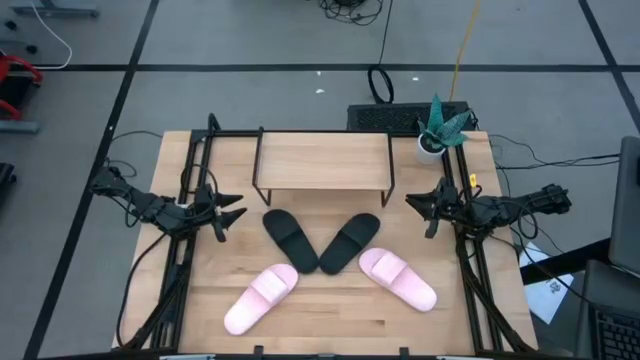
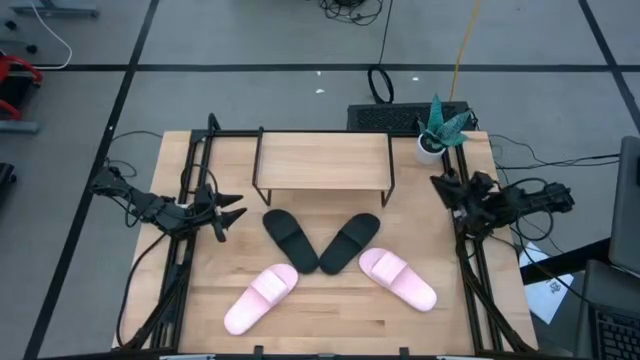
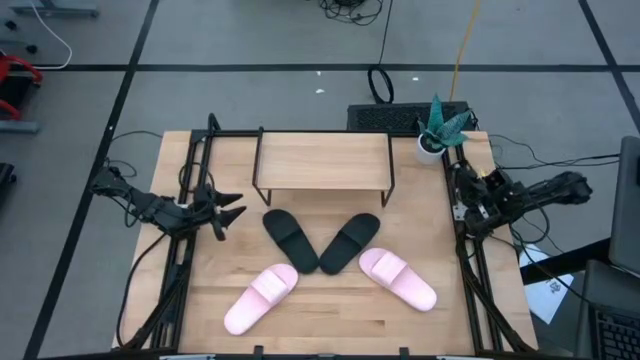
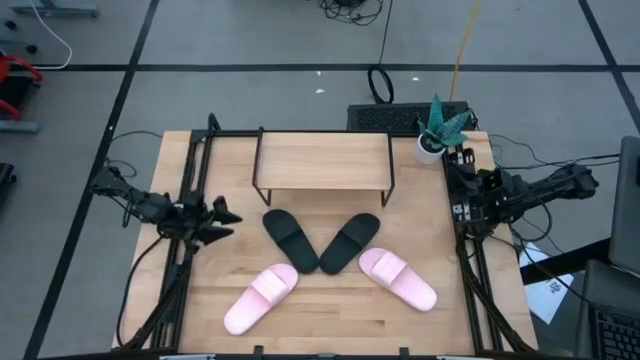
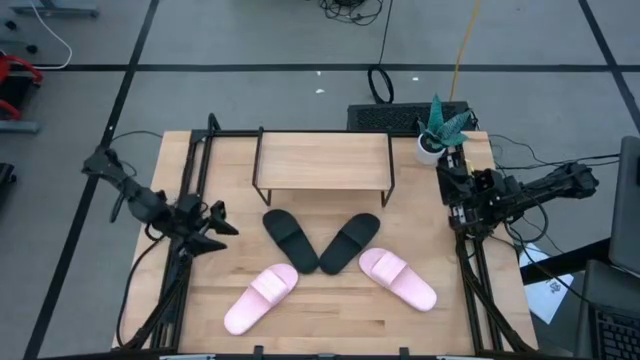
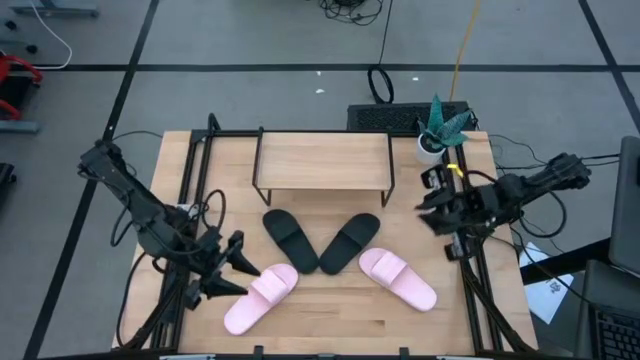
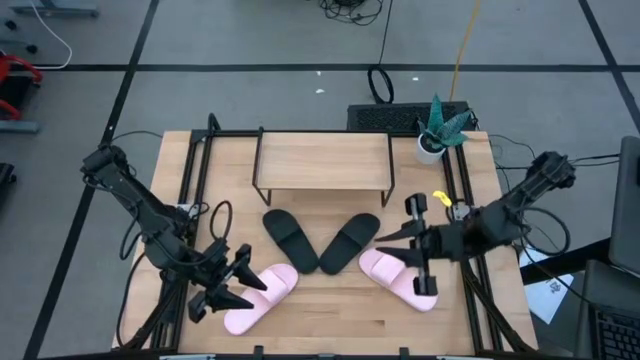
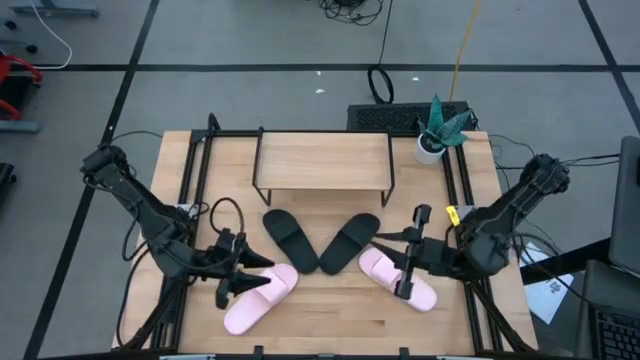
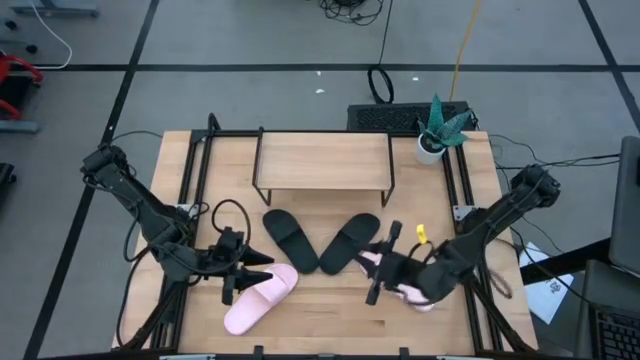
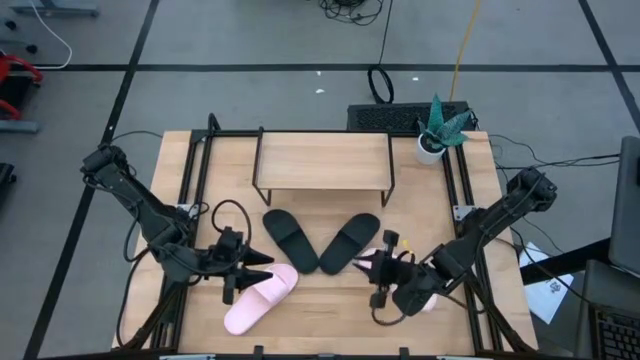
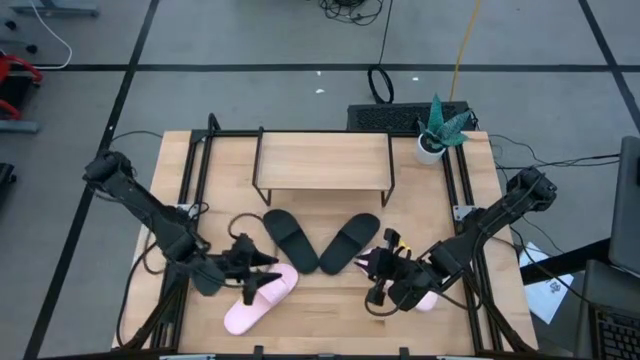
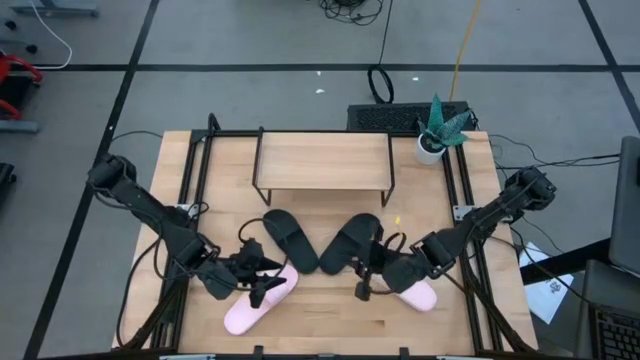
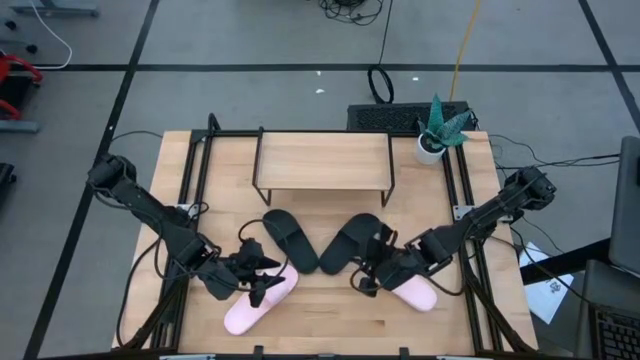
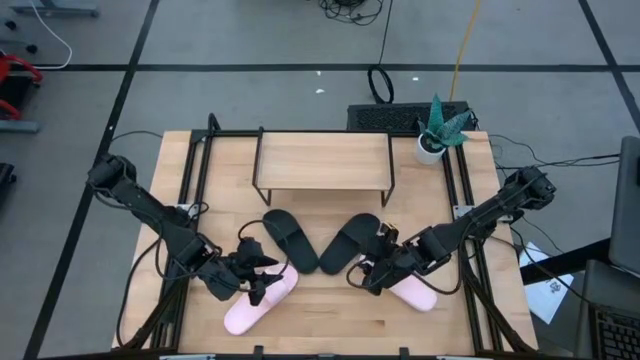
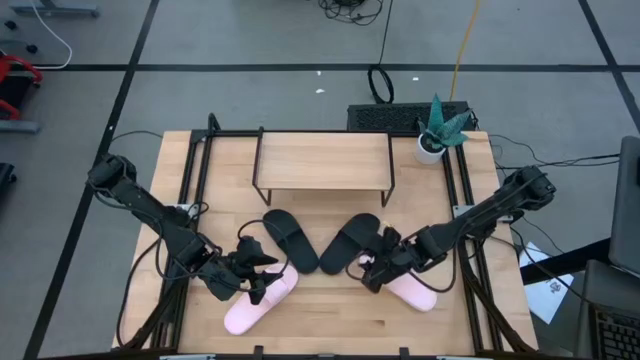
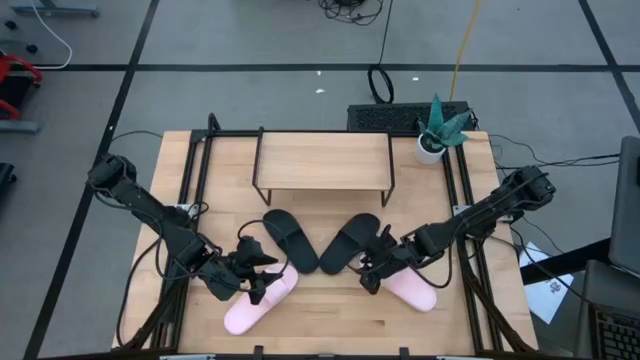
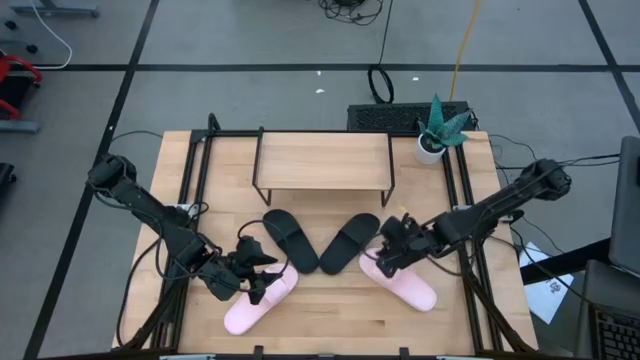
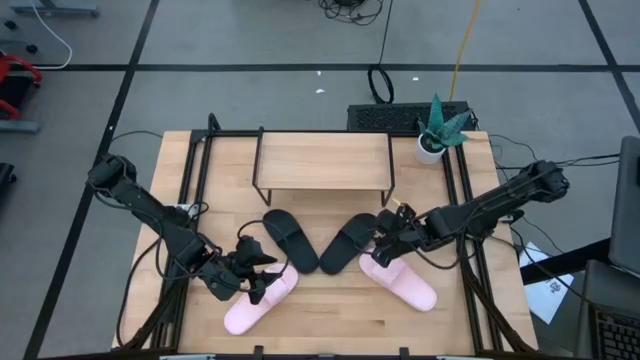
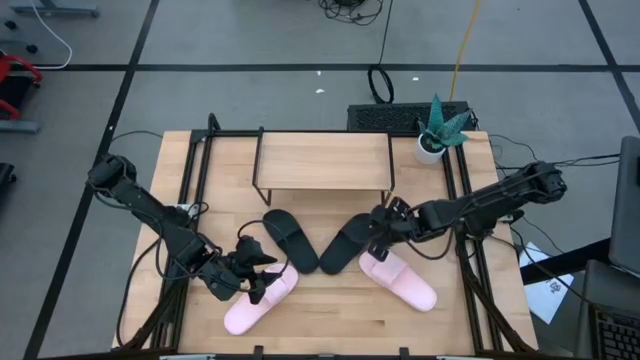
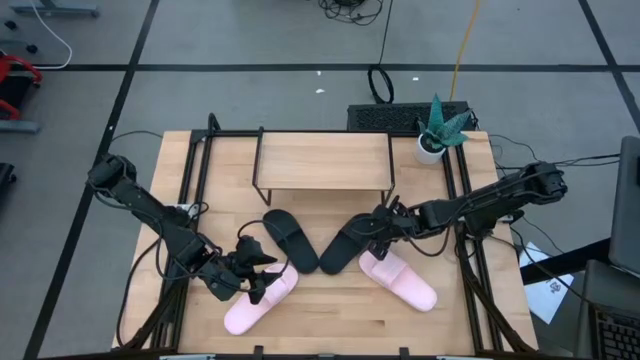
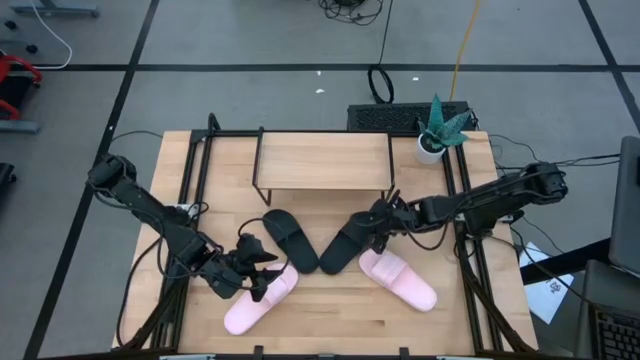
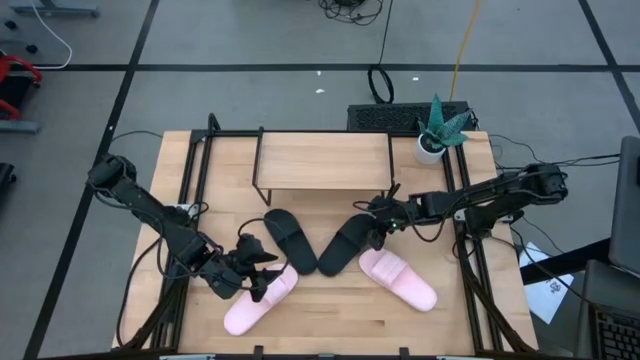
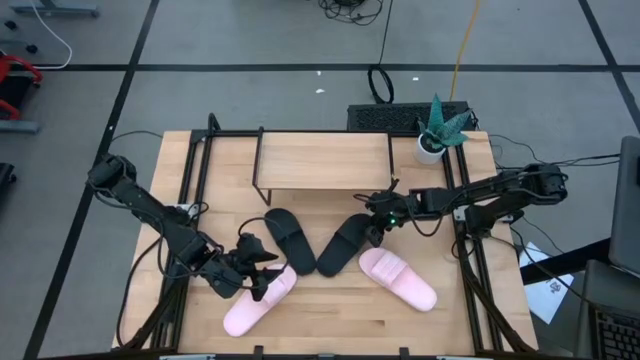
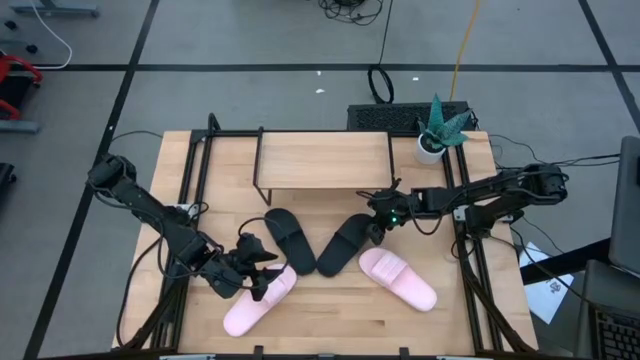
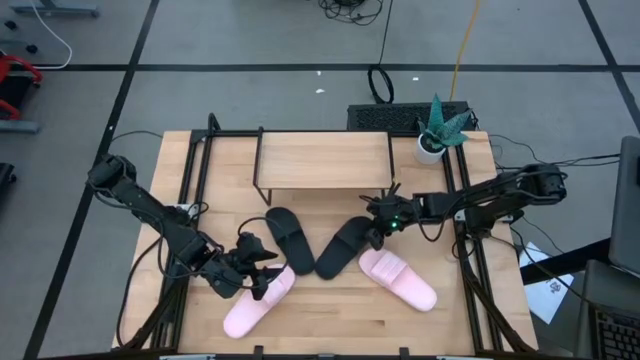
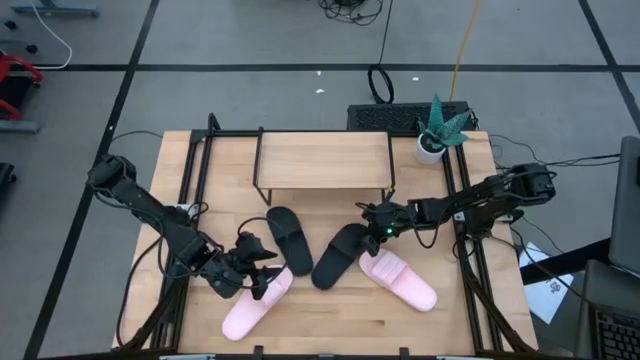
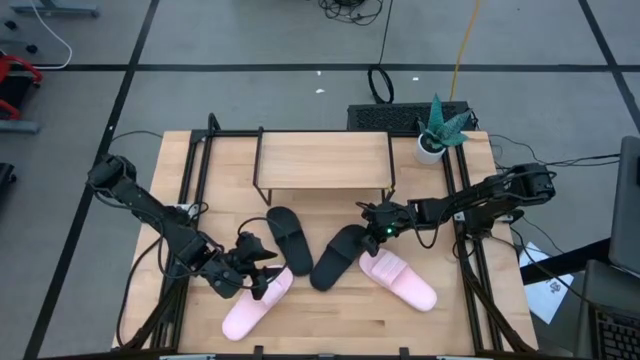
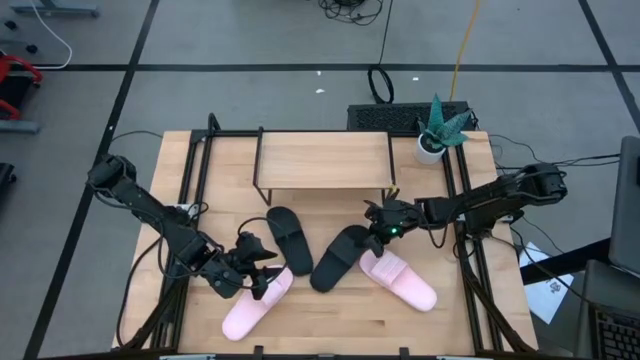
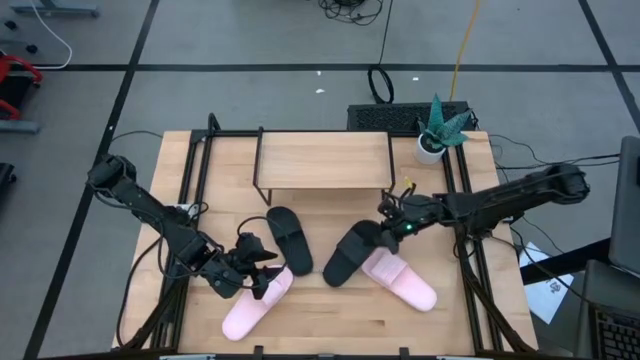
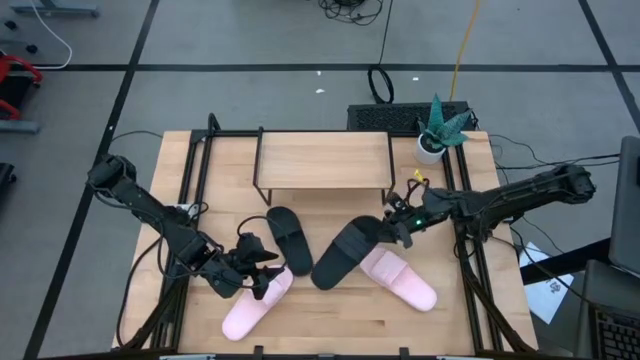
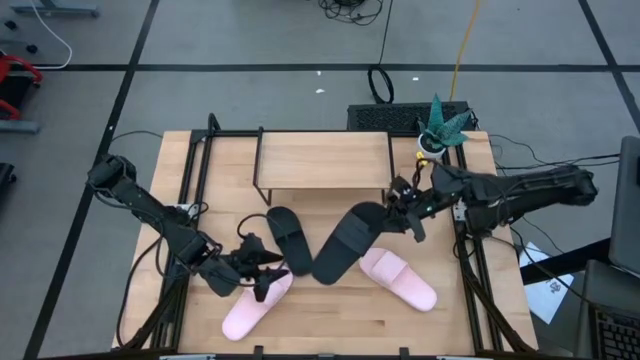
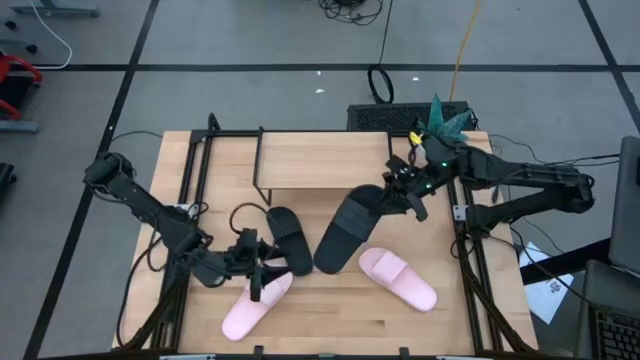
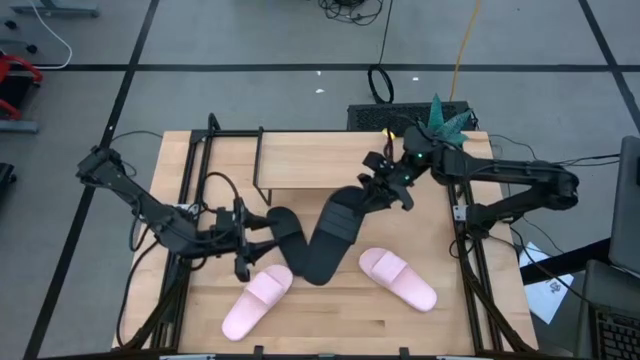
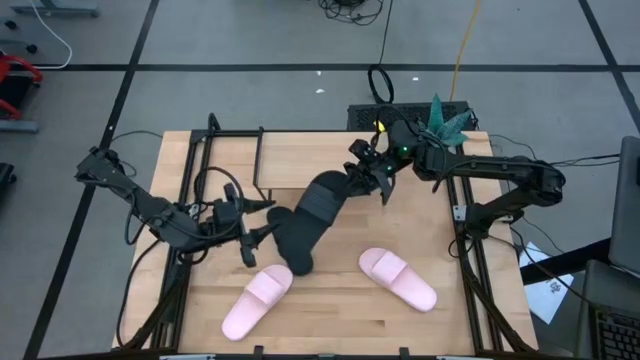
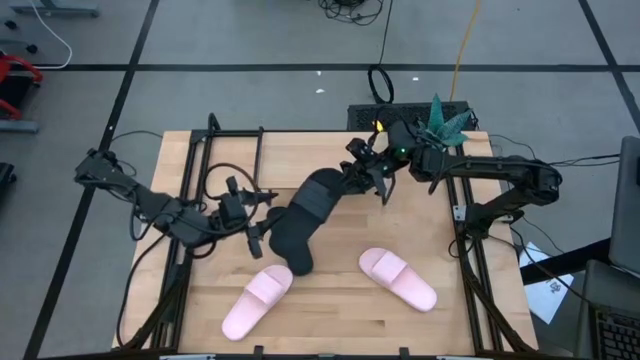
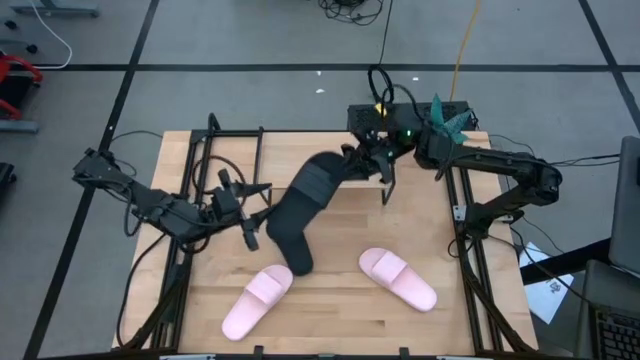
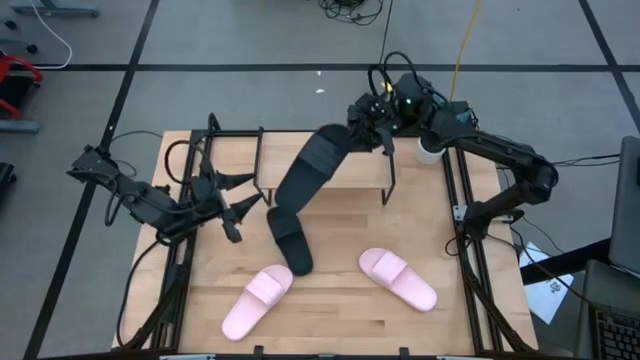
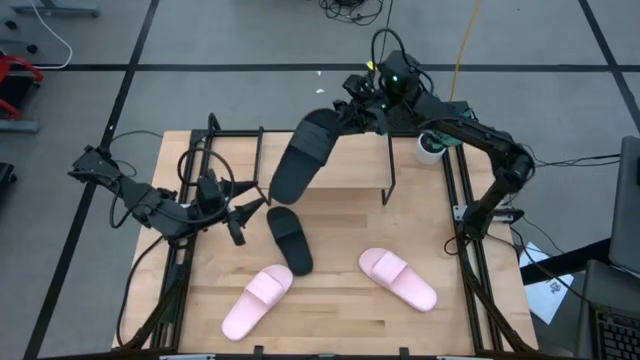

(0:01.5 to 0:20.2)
Task: Pick and place slides into the shelf
Put the right black slipper on the shelf
